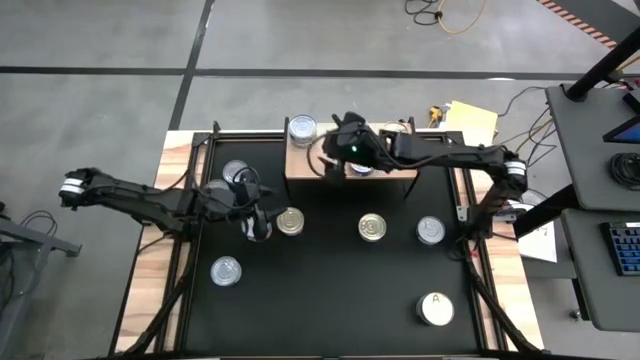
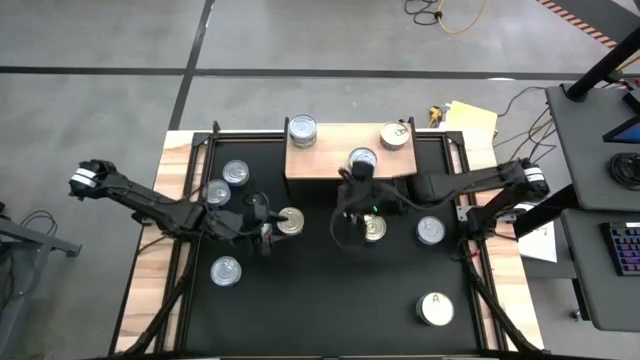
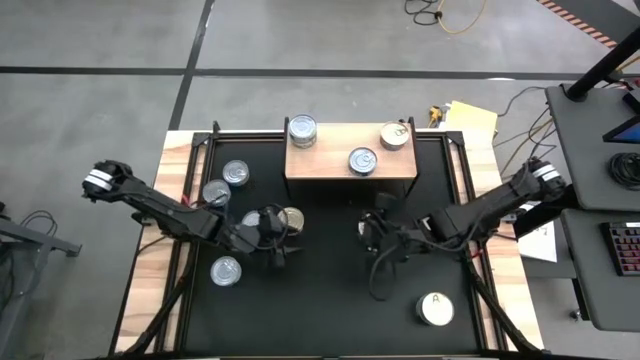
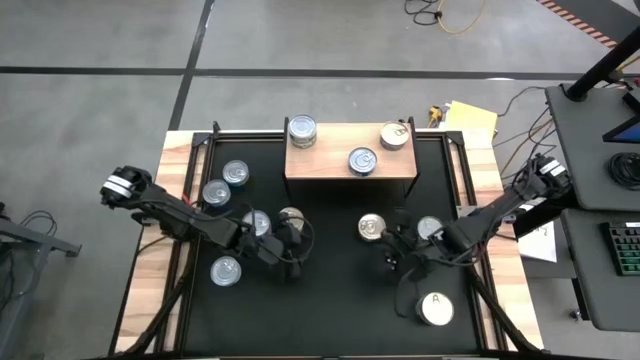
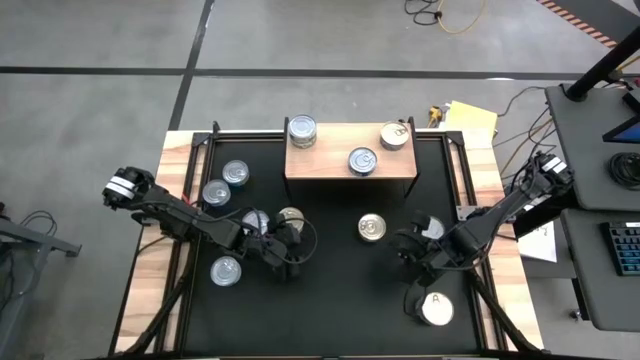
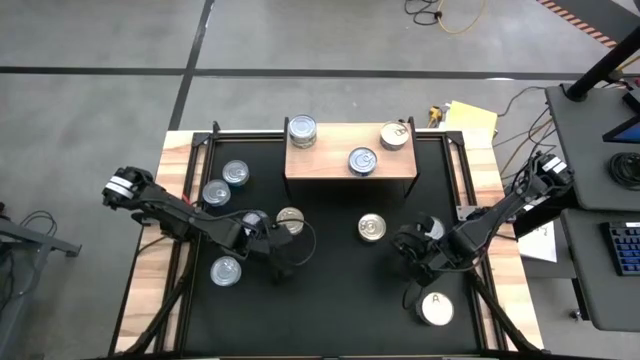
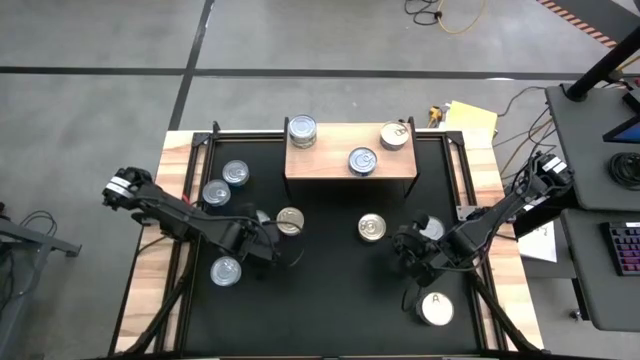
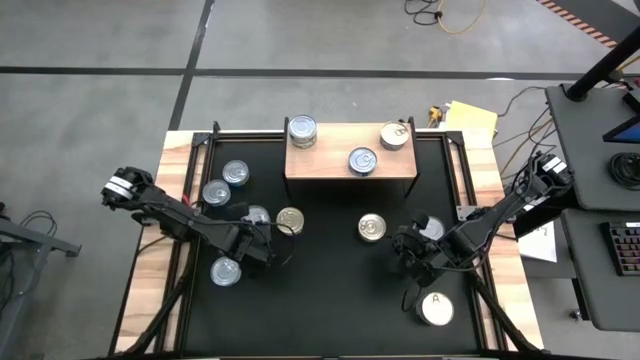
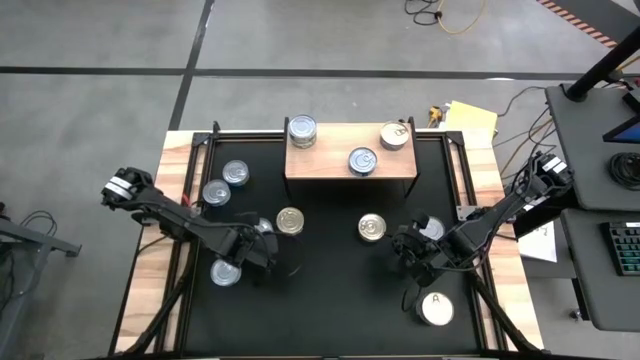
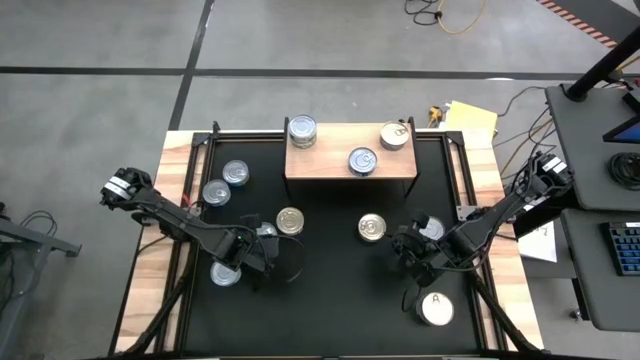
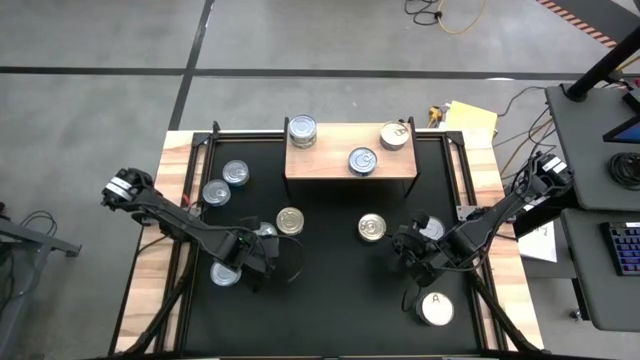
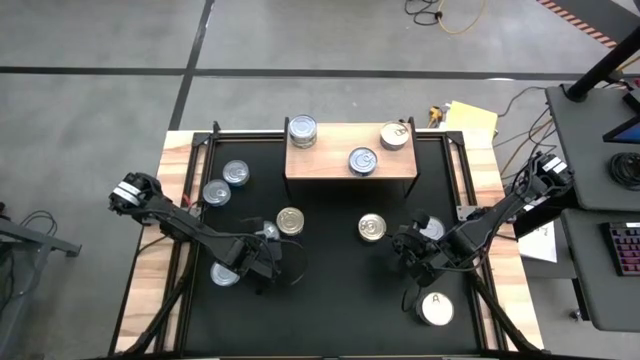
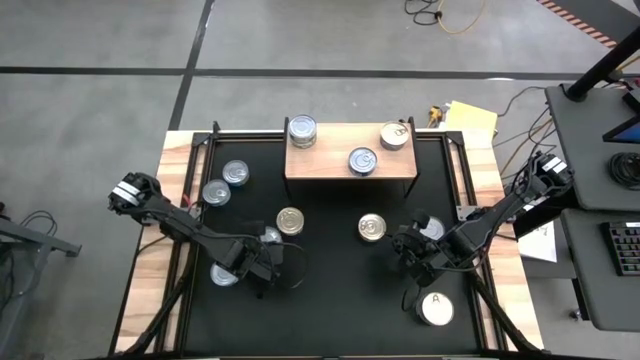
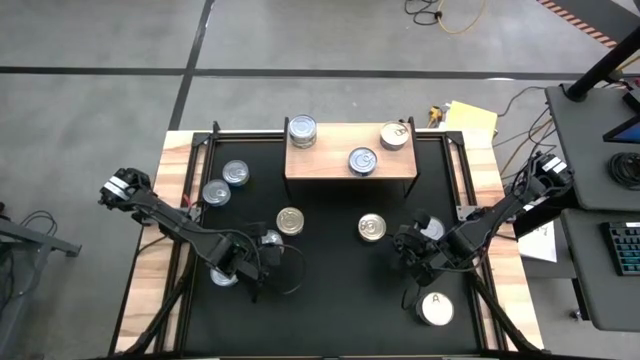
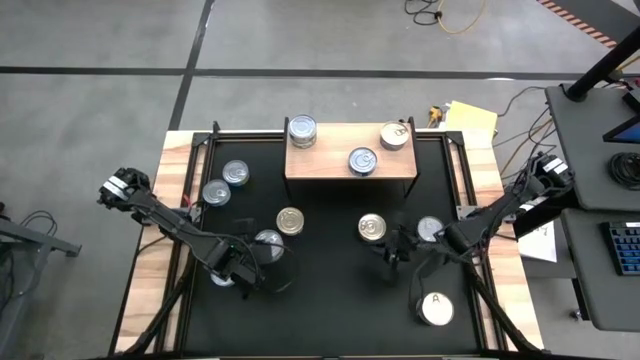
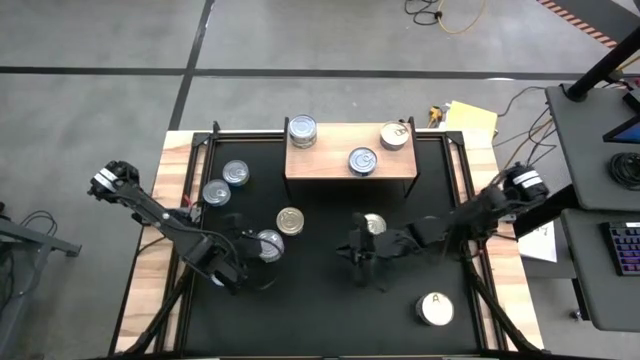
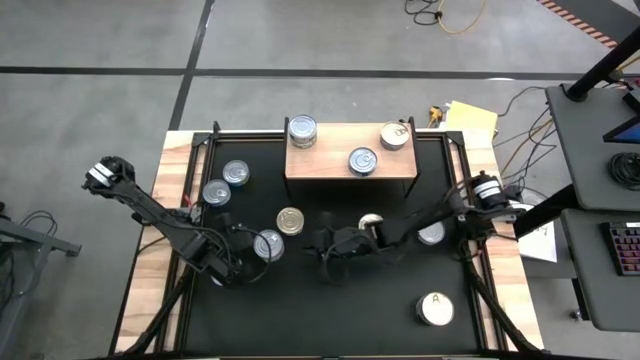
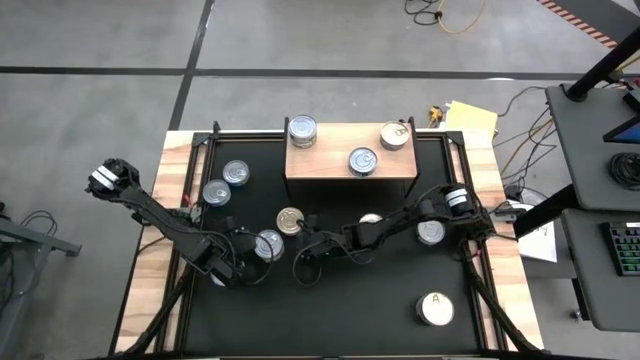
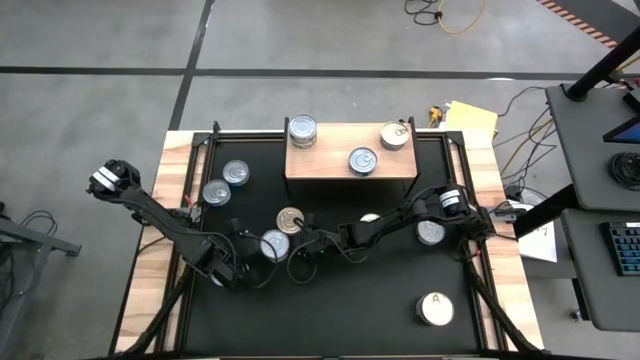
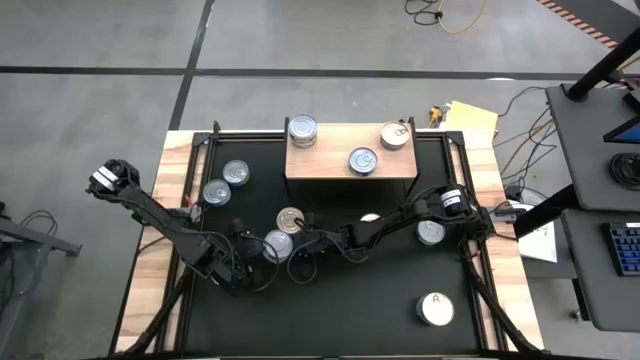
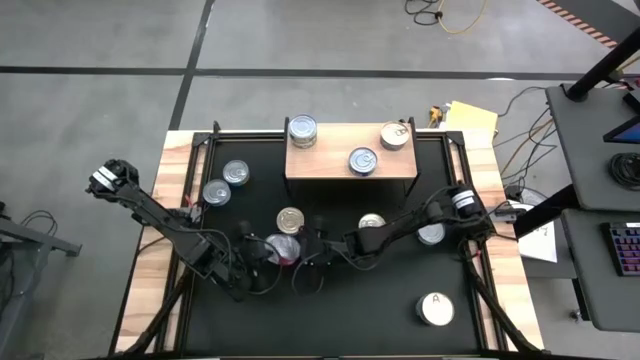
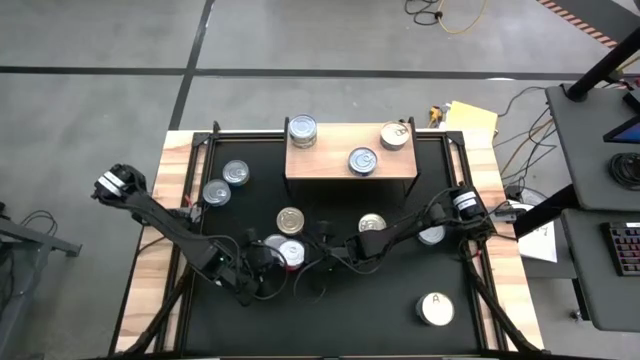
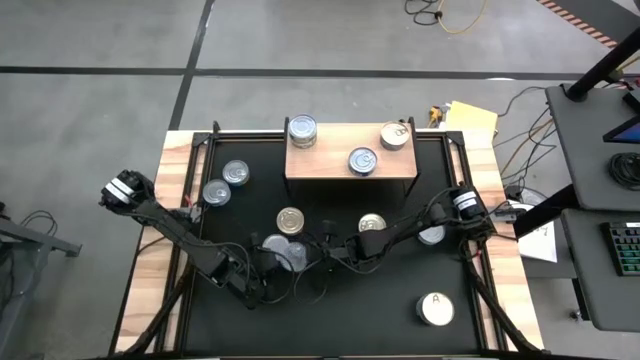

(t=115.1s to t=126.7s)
Task: Stack canned seafood by type on shelf
Put the red tuna can on the shelf

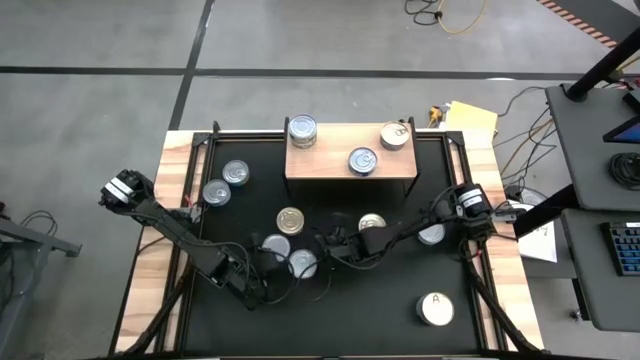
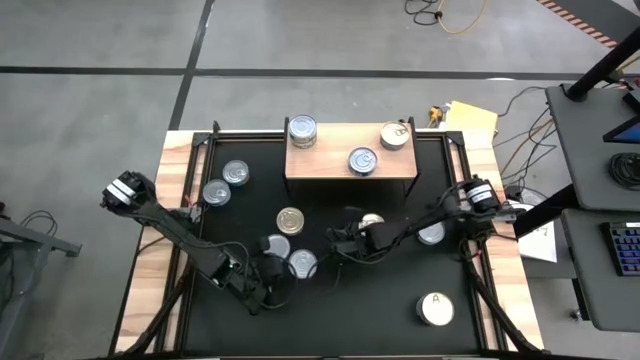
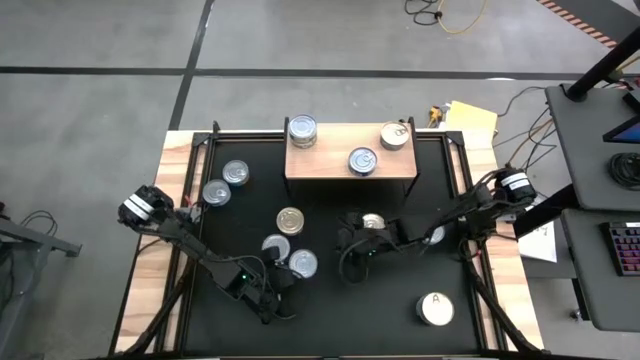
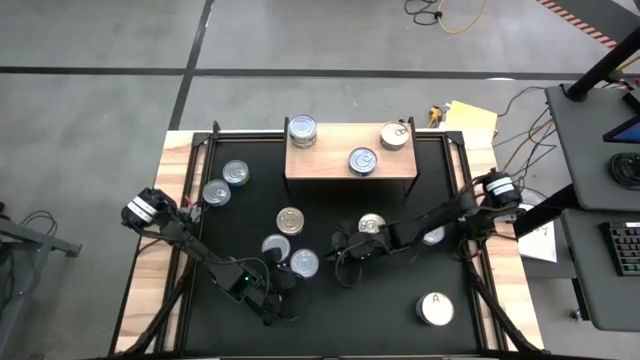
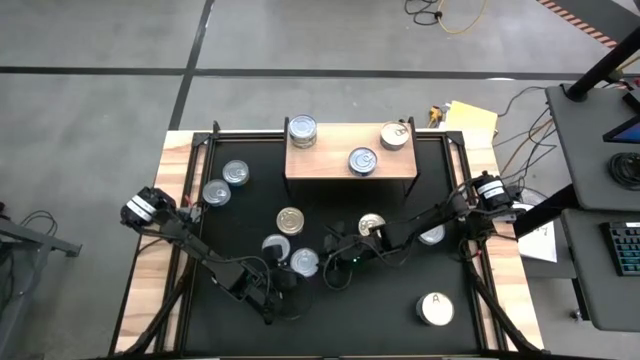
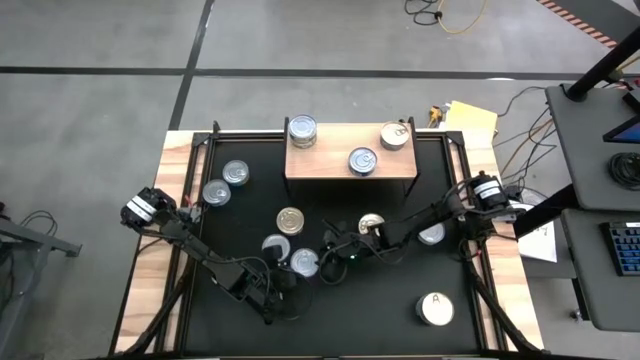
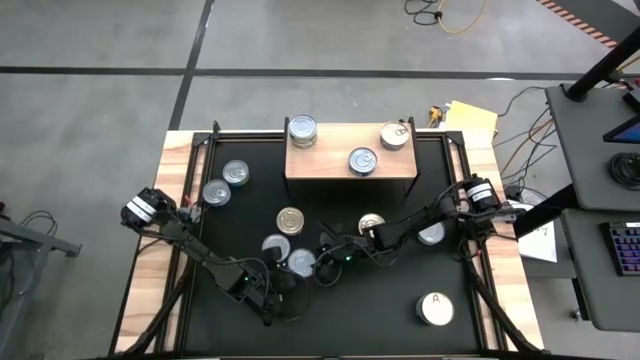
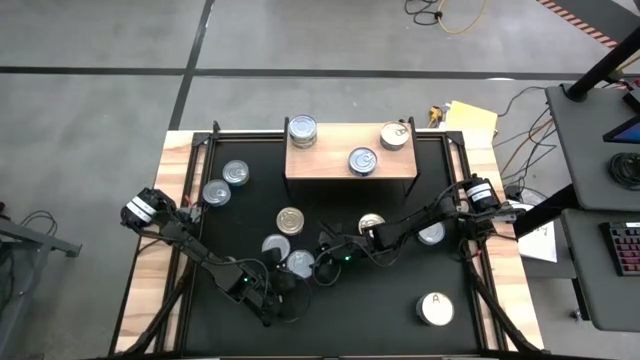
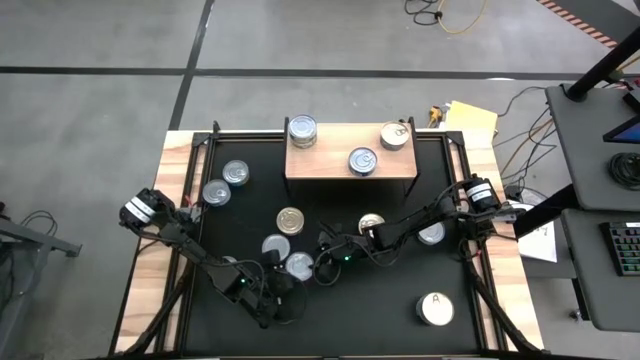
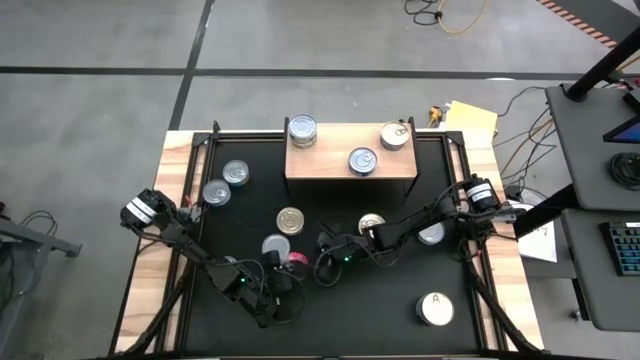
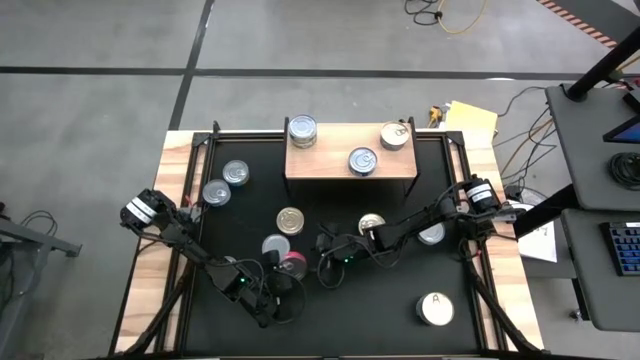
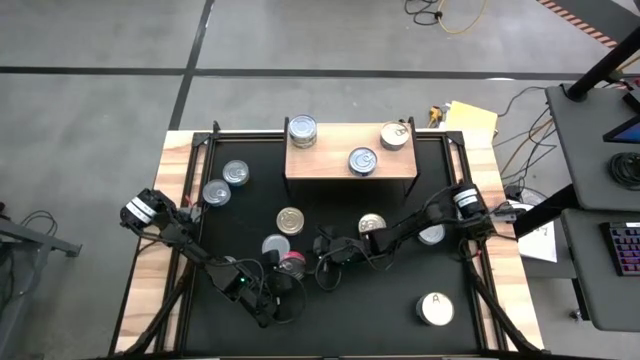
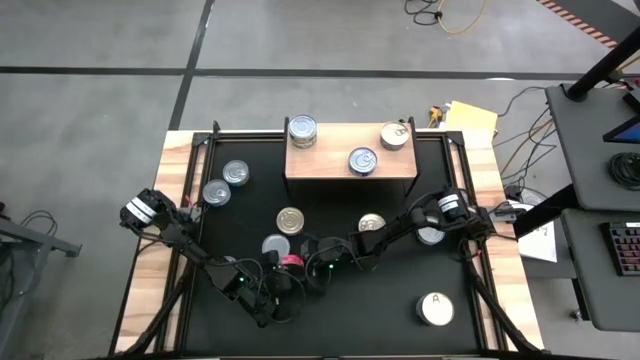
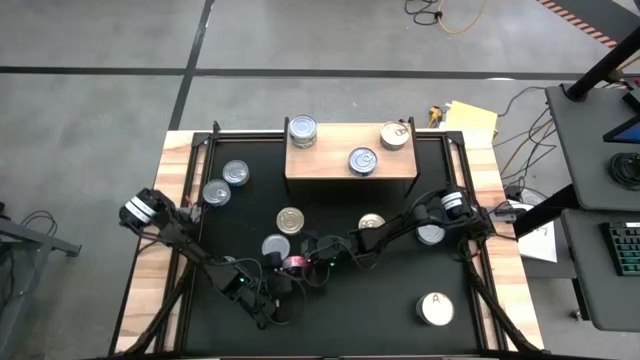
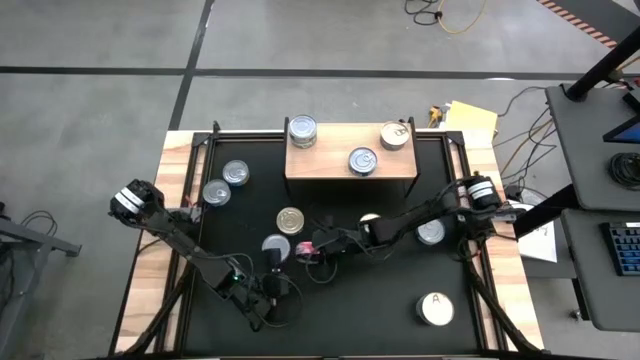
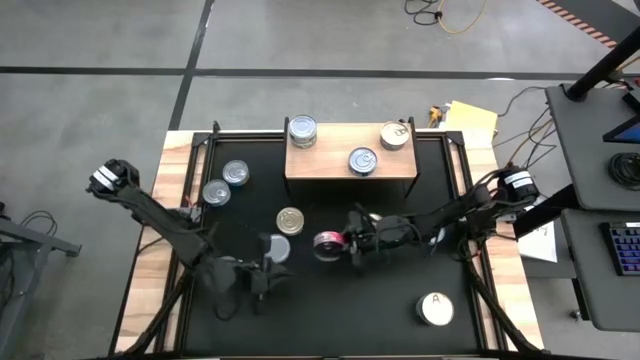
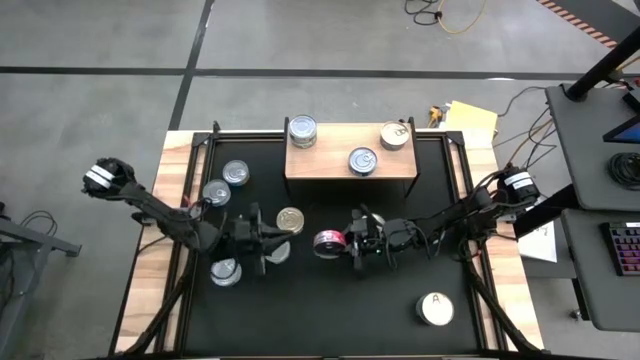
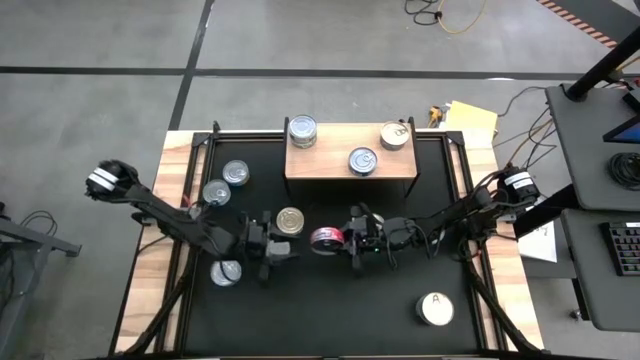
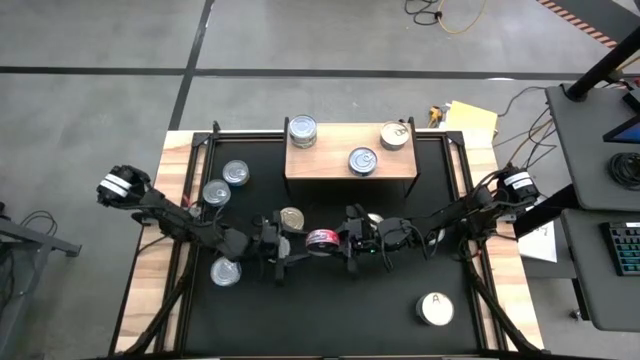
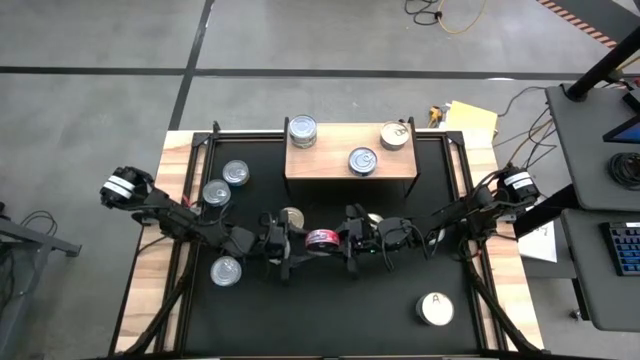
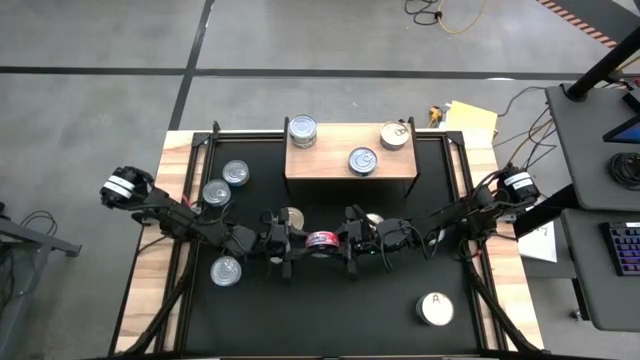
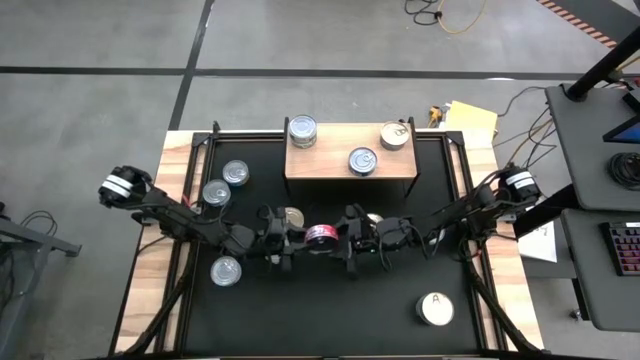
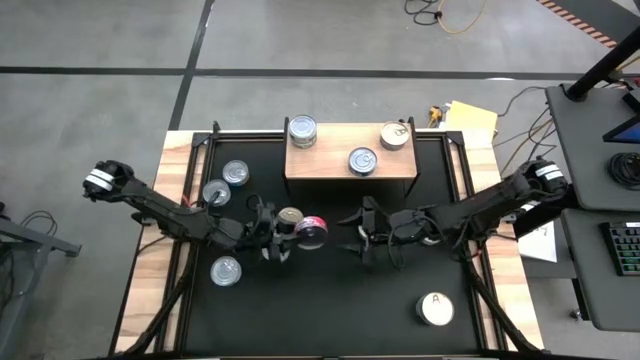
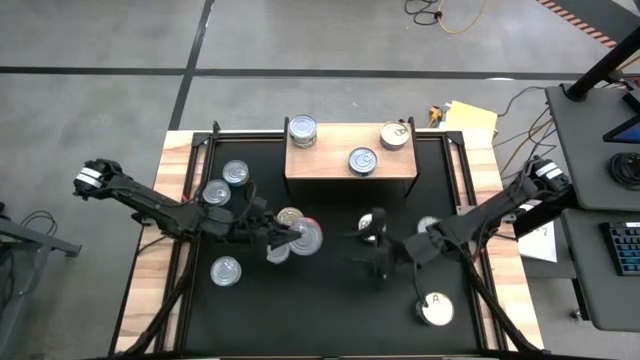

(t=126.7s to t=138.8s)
Put the red tuna can on the shelf
